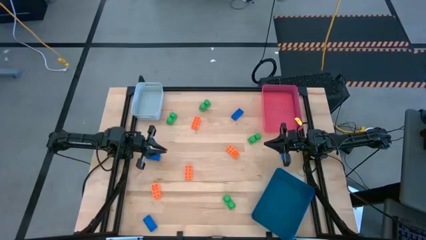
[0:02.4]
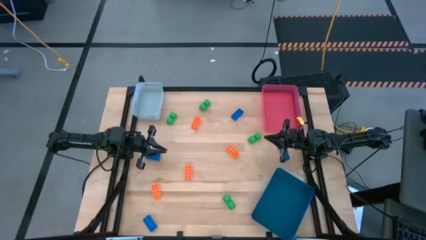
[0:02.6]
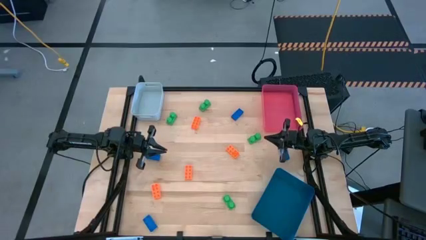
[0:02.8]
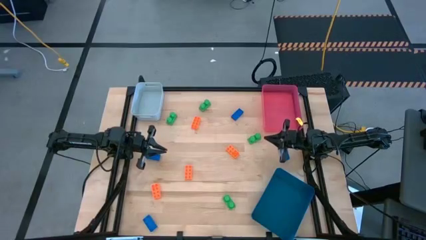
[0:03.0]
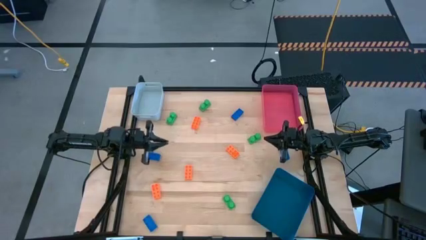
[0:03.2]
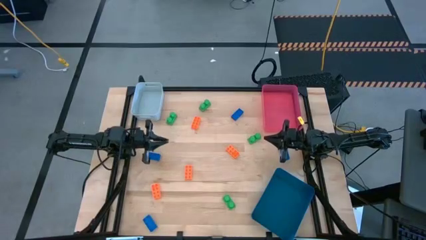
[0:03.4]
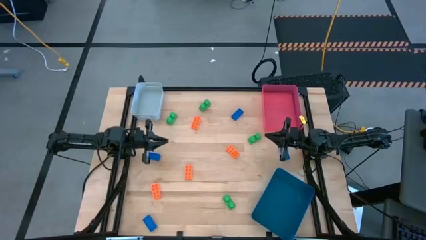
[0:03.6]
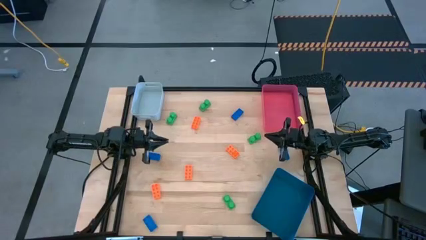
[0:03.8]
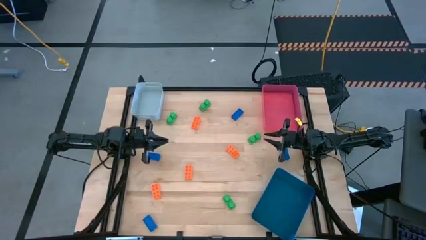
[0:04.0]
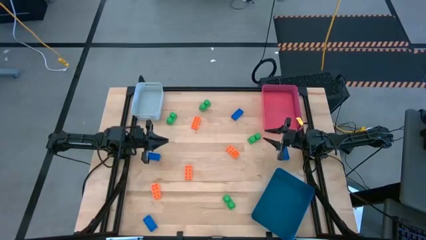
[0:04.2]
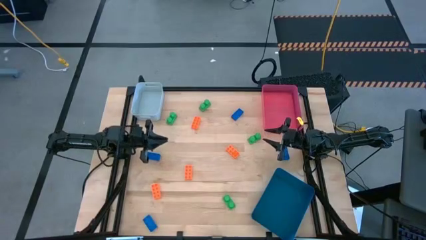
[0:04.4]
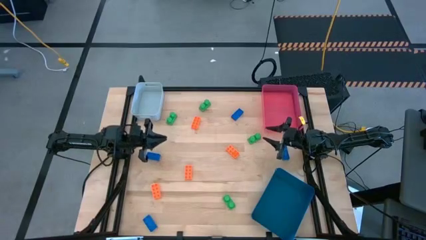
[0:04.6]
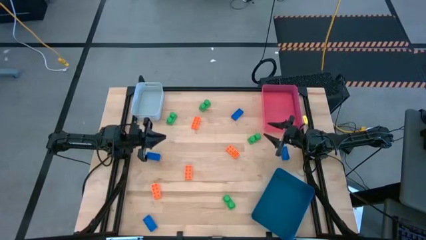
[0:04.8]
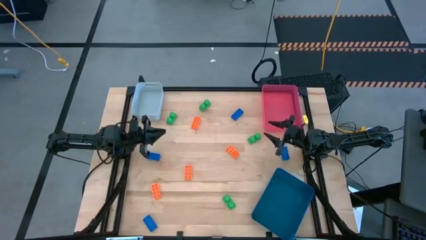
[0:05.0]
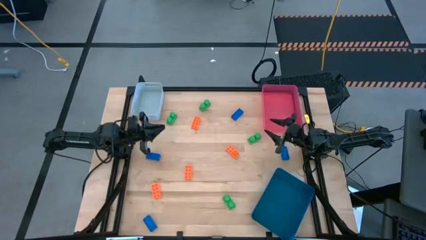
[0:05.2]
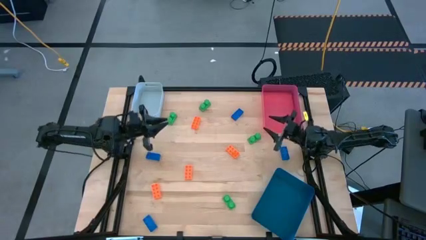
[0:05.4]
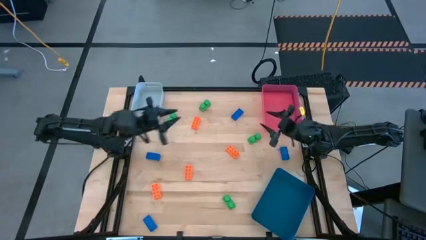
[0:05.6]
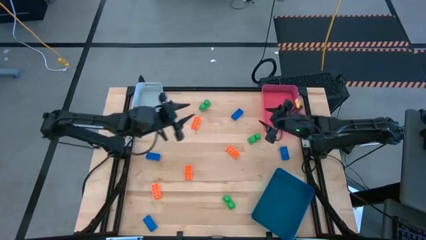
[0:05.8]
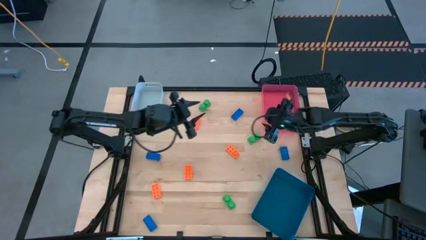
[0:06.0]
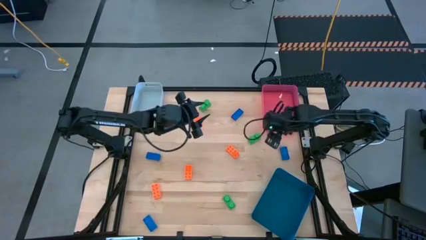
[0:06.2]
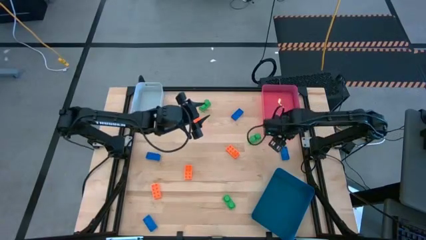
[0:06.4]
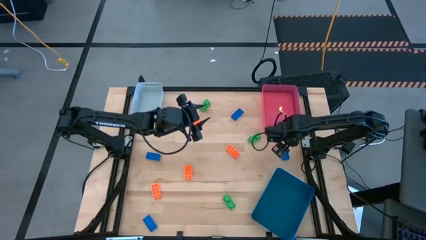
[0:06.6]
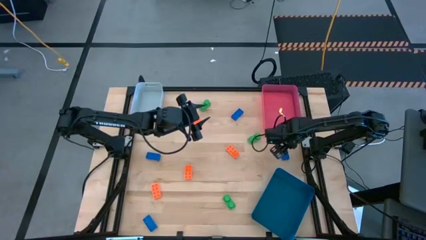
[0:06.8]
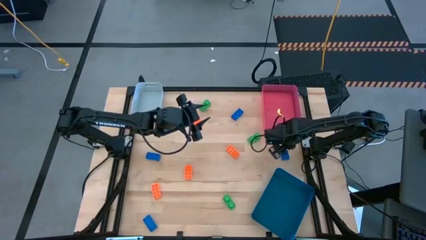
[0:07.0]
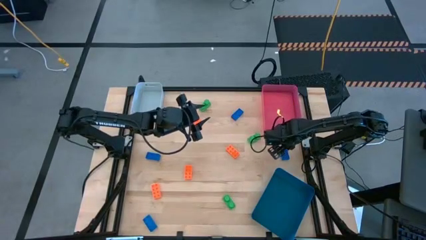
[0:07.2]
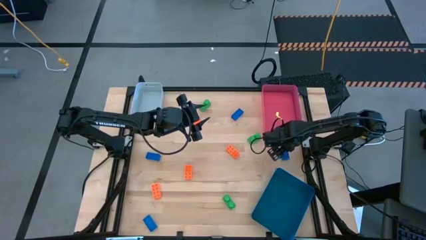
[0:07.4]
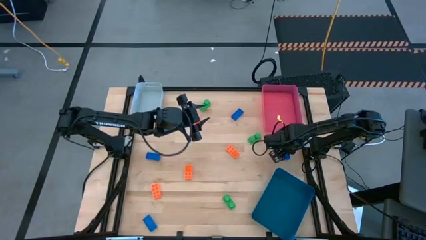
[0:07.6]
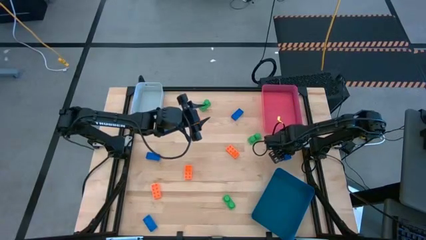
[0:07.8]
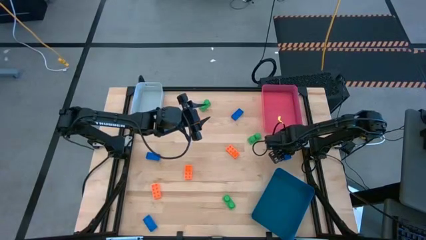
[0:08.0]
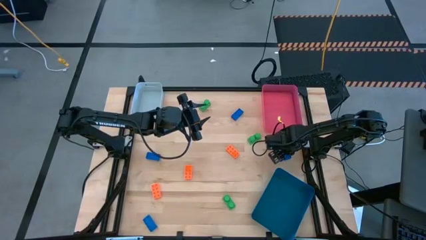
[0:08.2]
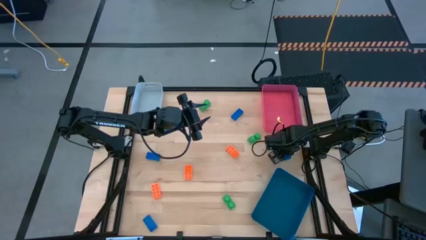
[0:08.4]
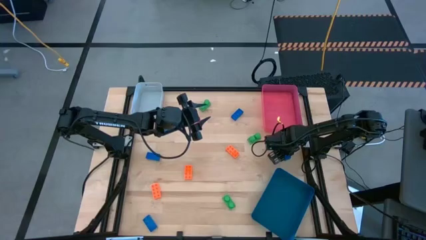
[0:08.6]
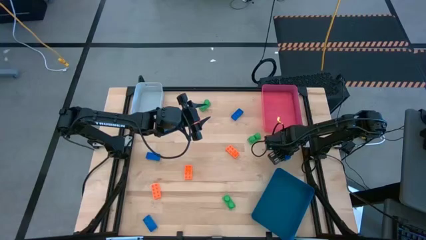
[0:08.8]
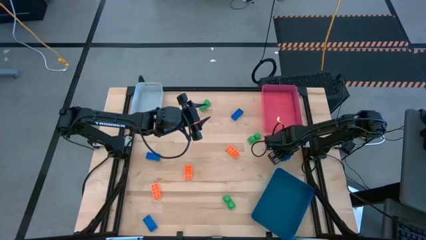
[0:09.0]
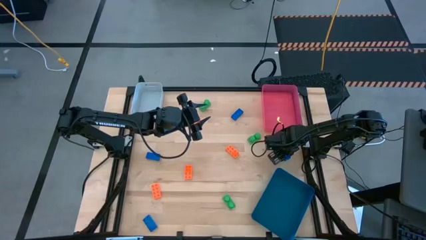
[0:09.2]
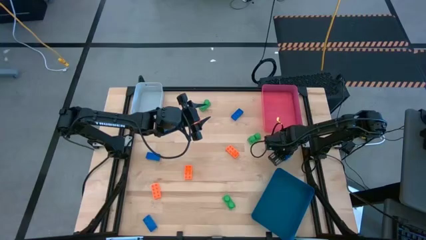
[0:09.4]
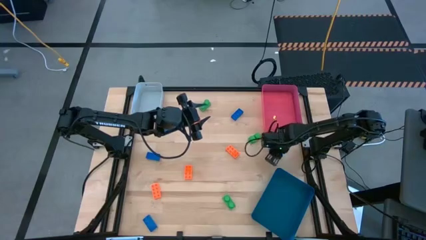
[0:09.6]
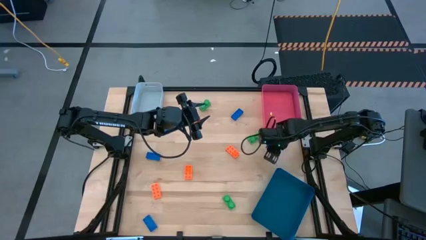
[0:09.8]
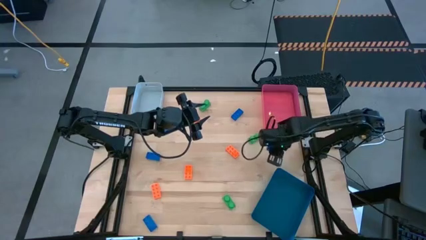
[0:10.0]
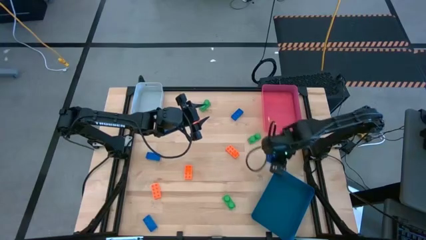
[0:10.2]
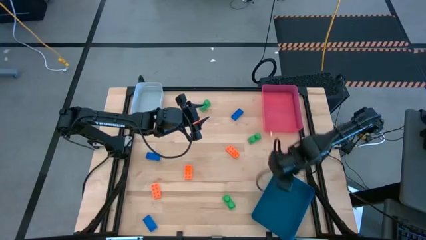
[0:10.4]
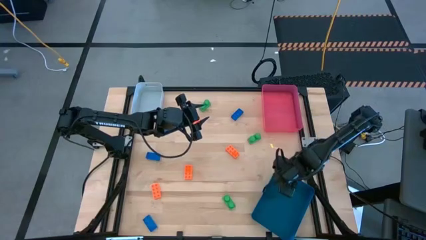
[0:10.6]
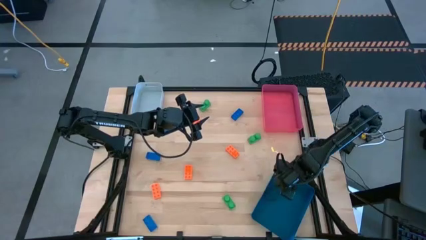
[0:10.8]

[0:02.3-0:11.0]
Task: Sort & place blocks by color
Put the blue gamepiece into the blue bin

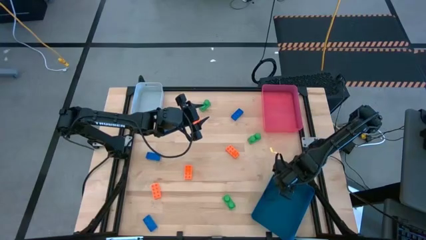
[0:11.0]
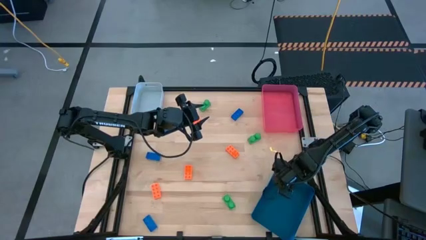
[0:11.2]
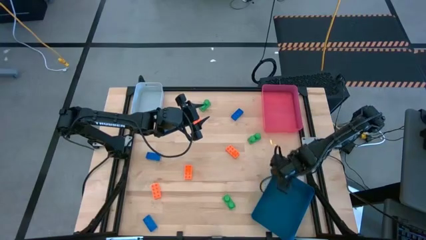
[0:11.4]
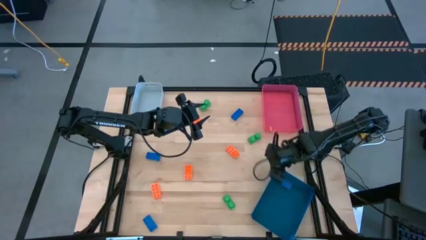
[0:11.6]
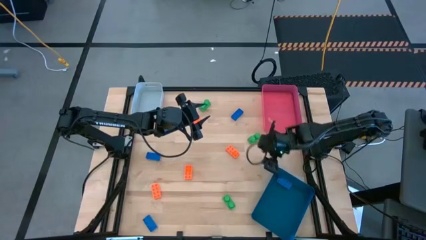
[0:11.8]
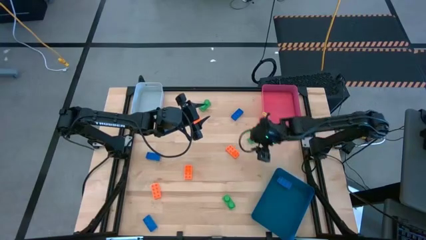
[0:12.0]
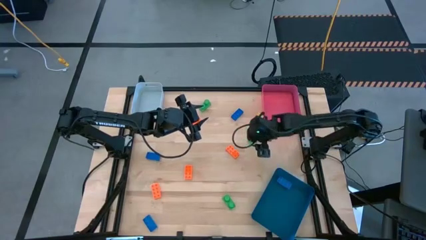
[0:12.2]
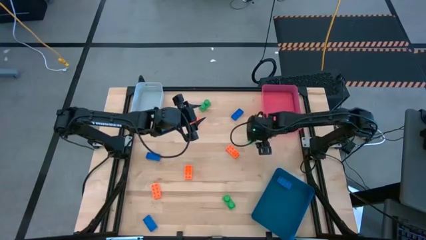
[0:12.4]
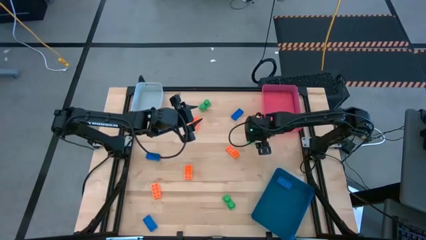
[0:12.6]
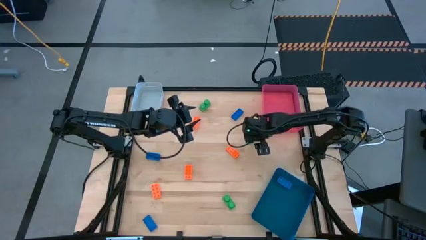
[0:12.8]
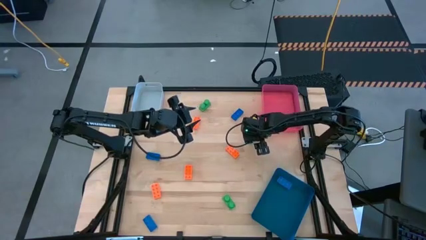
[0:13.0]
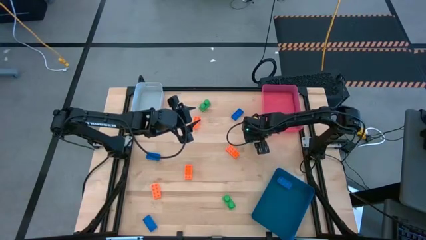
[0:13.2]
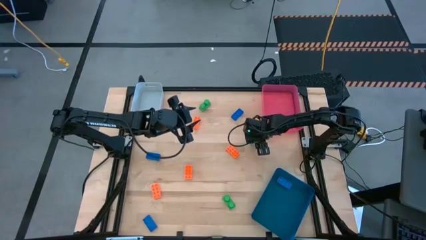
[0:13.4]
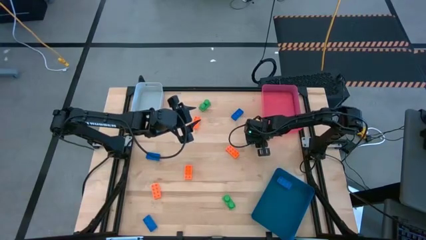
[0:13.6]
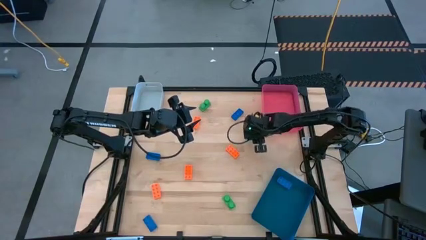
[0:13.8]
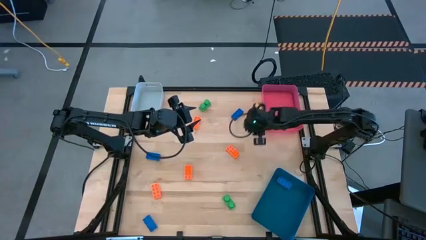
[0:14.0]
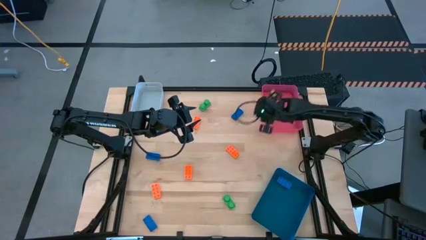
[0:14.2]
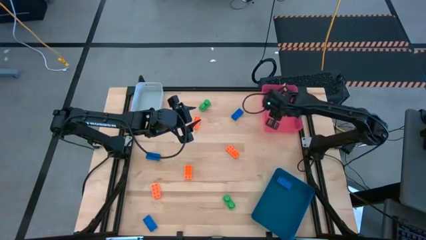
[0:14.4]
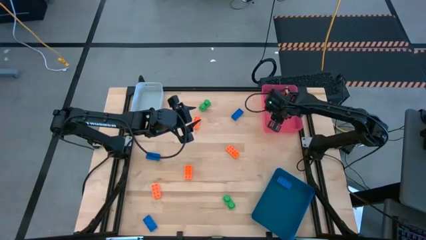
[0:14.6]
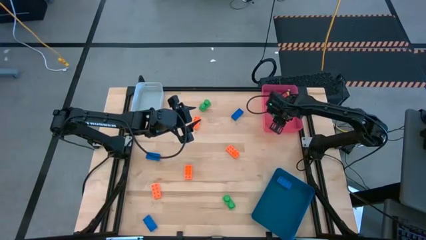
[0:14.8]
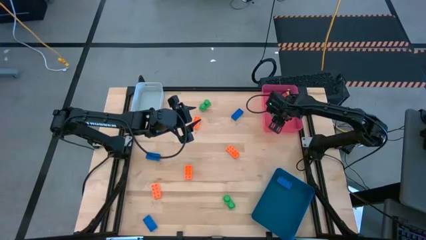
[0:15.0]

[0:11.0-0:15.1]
Put the green gamepiece into the pink bin

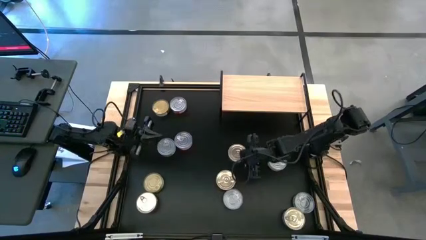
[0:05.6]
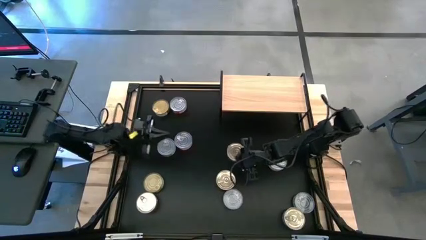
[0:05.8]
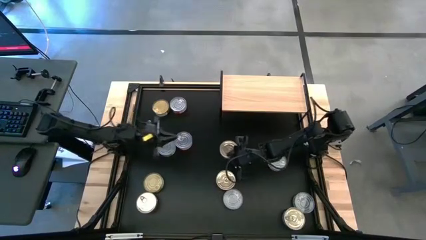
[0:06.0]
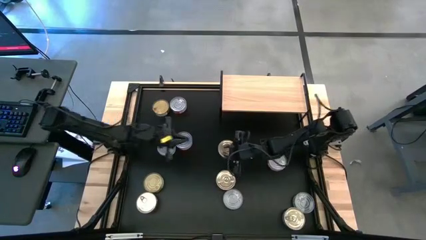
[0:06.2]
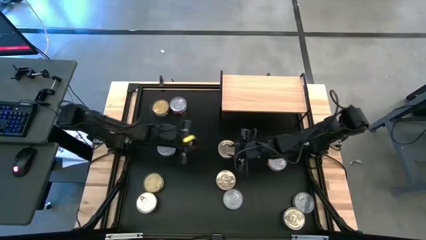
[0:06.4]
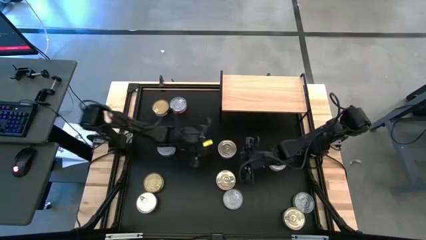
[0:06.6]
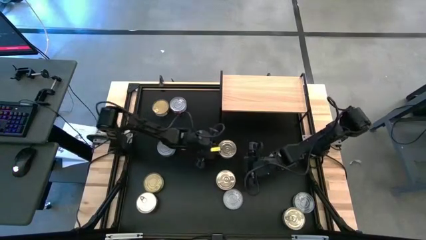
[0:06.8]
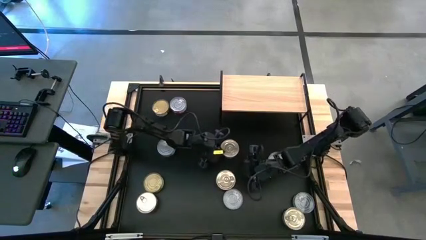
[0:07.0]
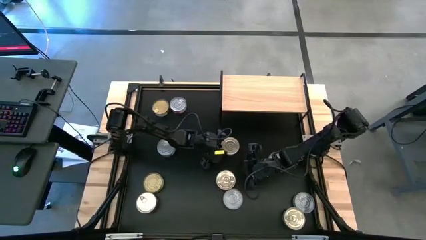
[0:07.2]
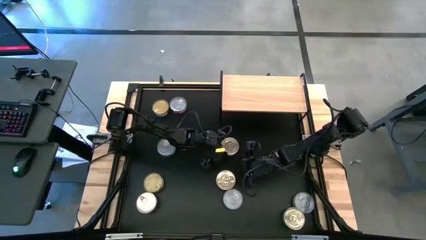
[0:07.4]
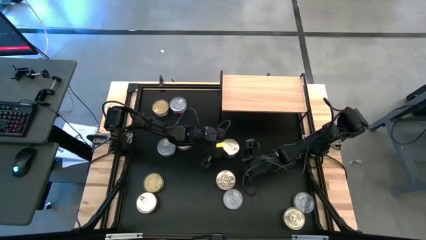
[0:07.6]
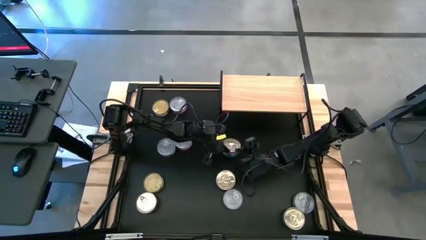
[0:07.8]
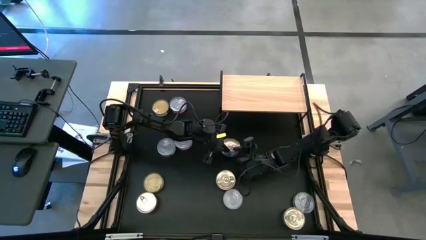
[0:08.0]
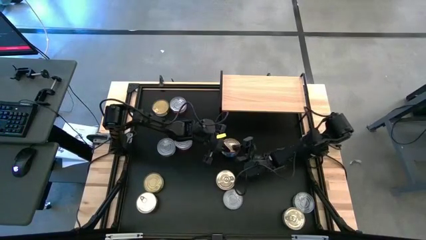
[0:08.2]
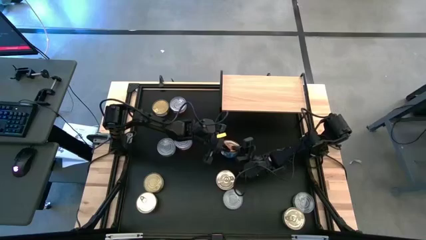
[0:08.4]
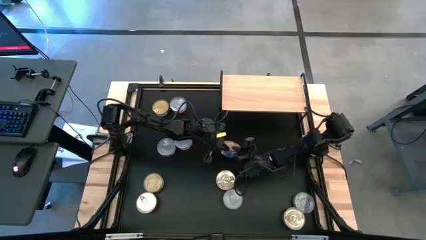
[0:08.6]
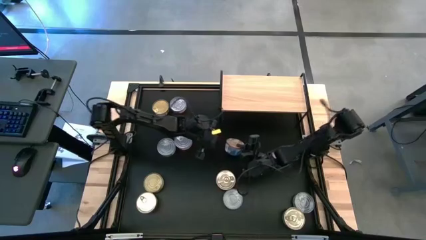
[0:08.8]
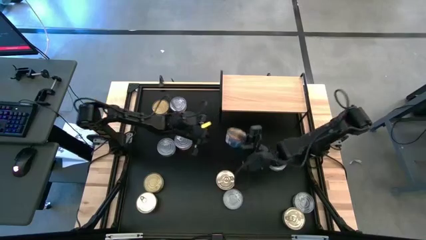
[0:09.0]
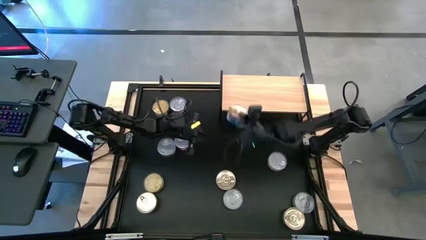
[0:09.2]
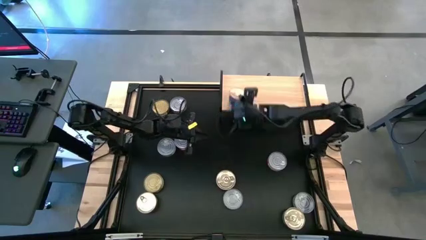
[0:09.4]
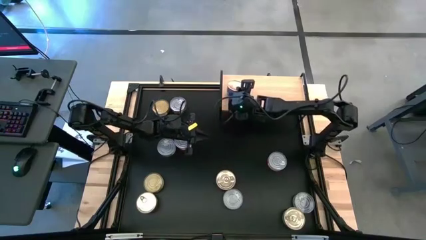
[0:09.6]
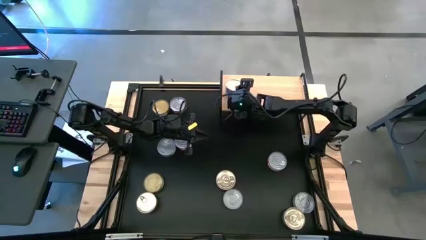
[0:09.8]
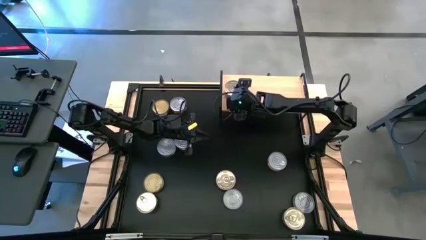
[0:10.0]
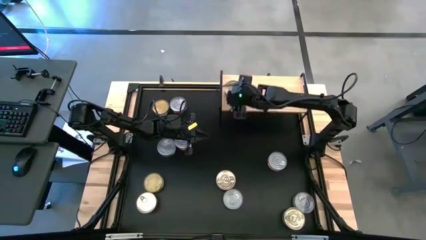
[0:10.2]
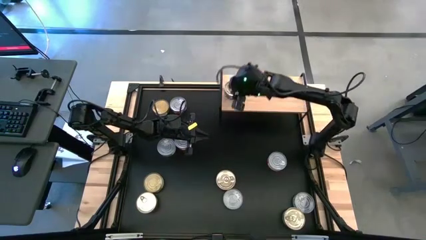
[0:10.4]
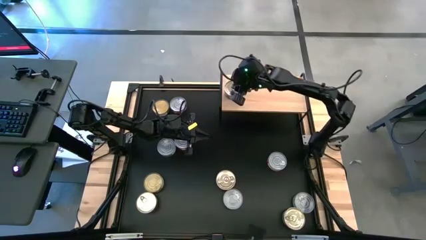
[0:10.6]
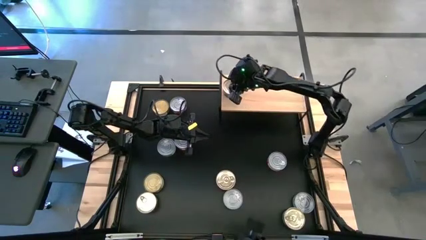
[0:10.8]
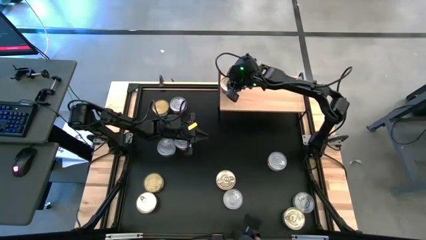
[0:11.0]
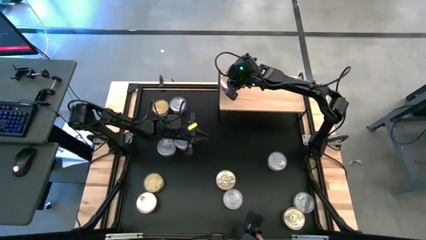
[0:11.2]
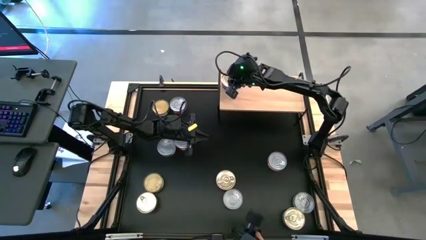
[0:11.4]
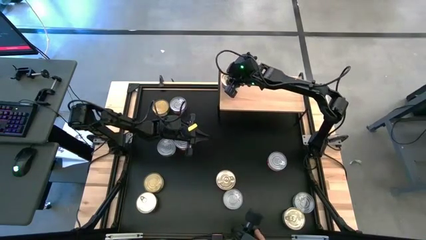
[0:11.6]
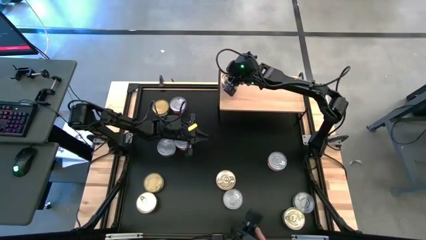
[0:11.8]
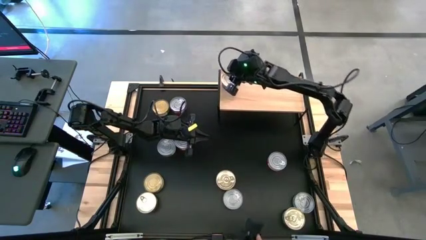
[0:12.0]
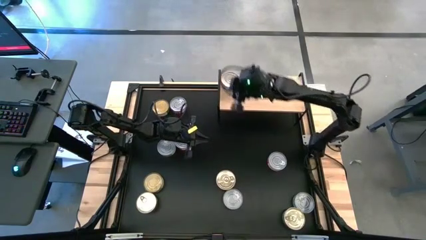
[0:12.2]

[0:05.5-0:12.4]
Task: Stack canned seafood by type on shelf
Put the blue tuna can on the shelf
